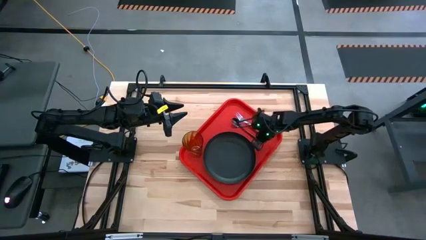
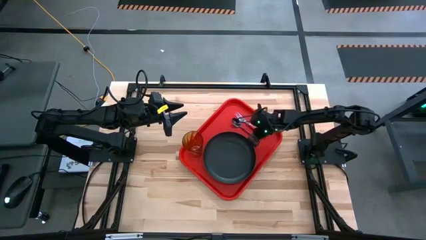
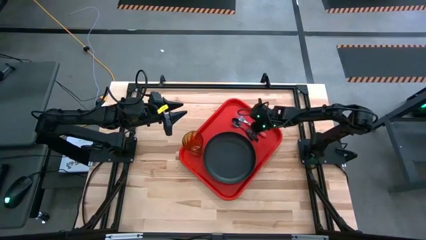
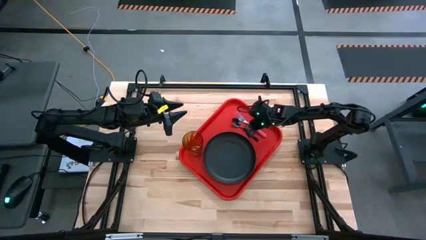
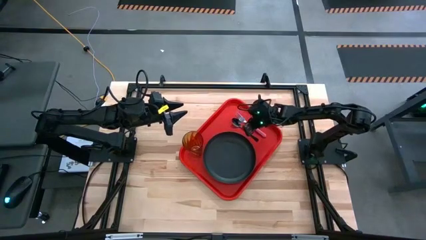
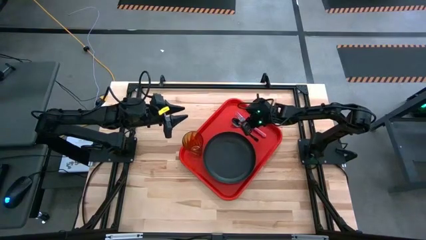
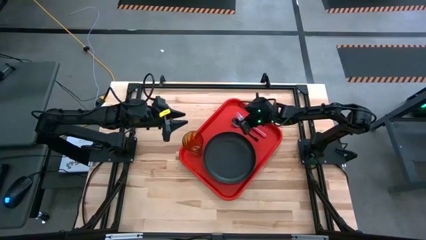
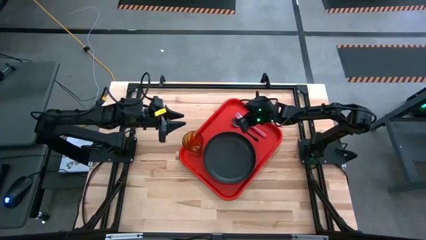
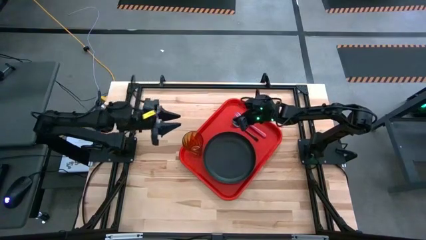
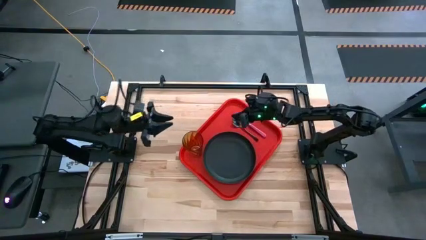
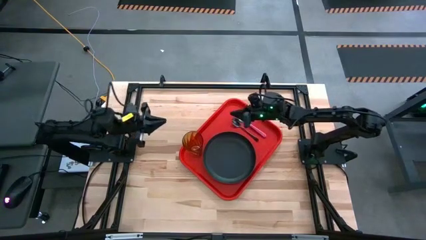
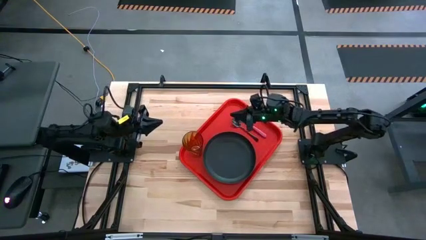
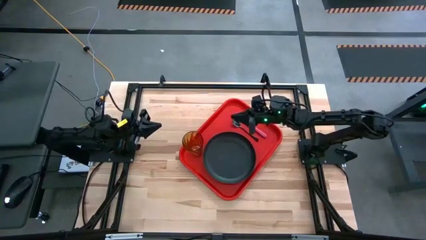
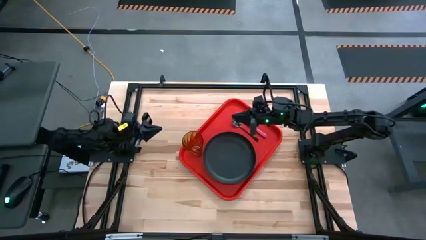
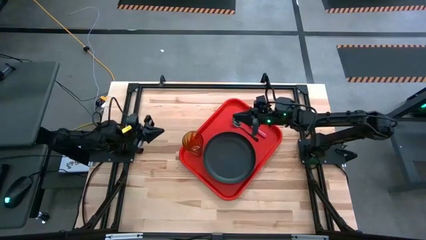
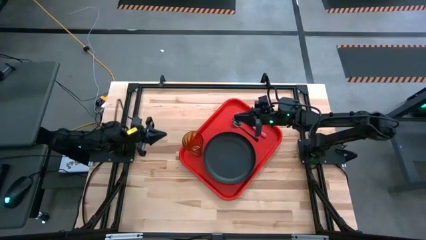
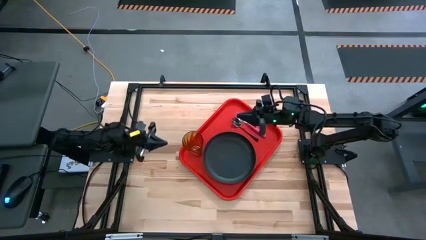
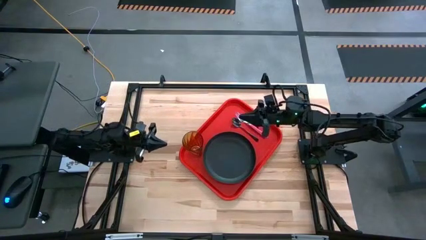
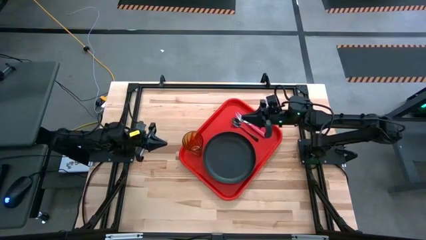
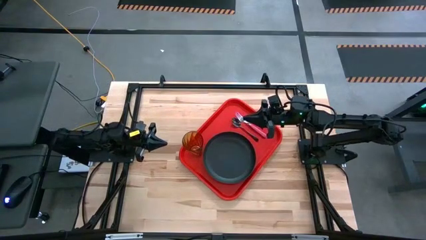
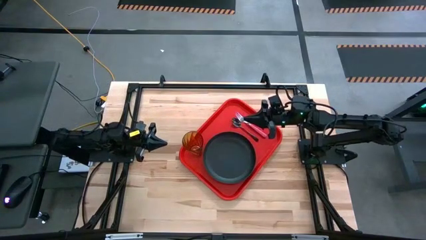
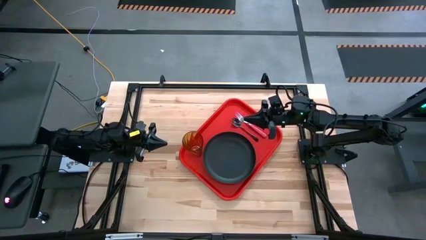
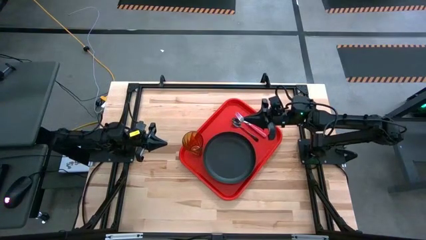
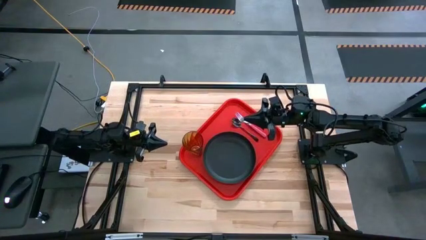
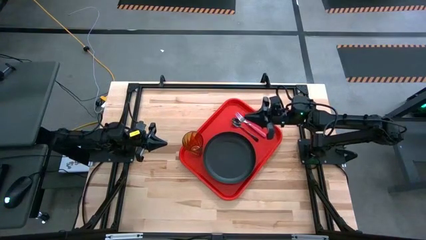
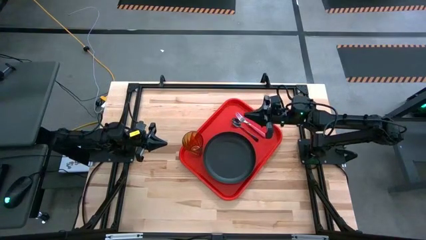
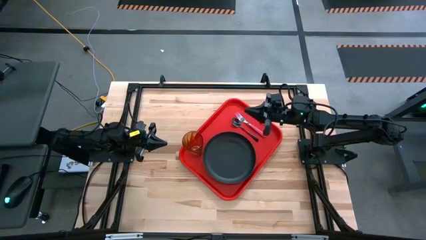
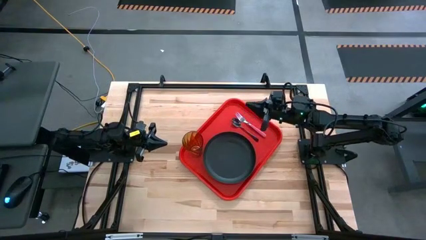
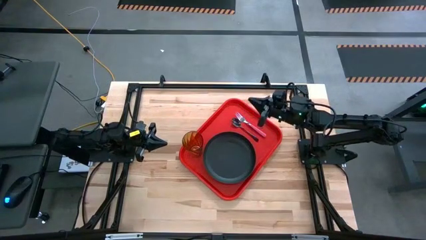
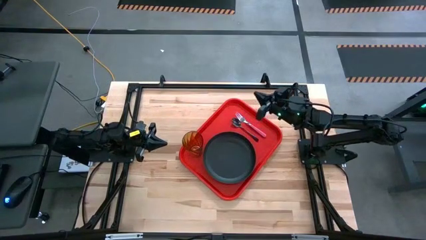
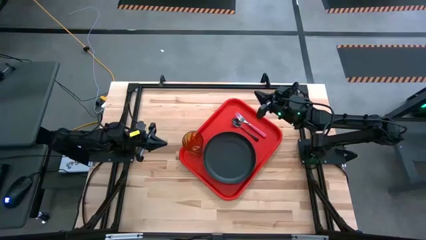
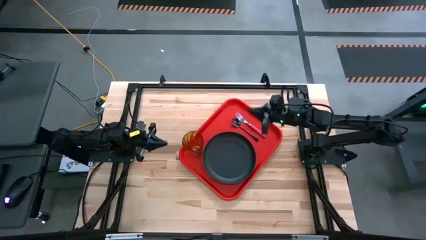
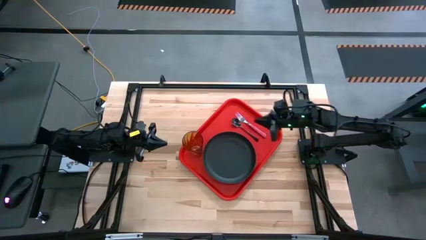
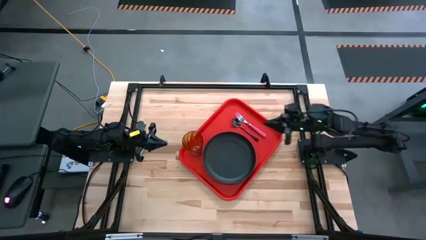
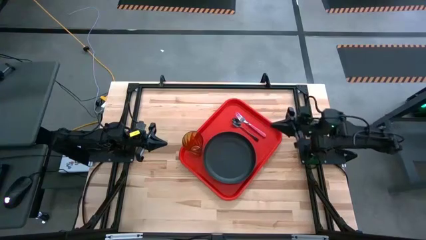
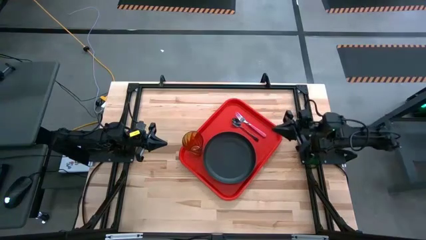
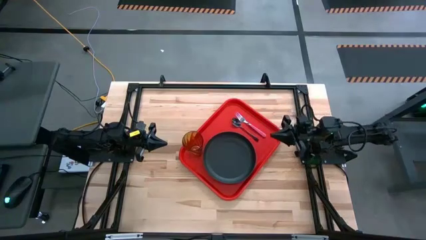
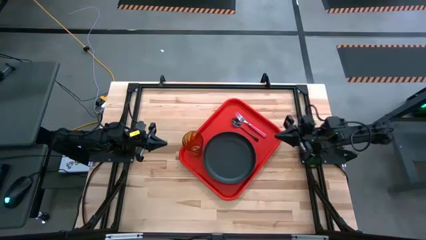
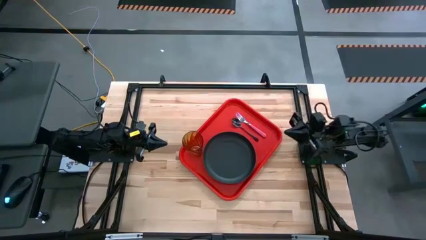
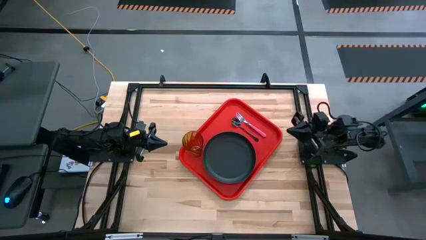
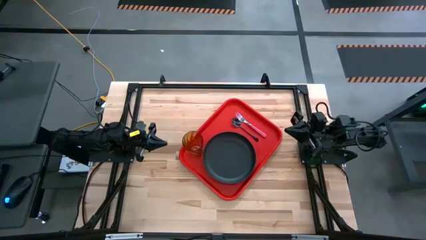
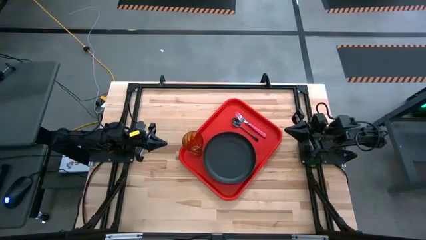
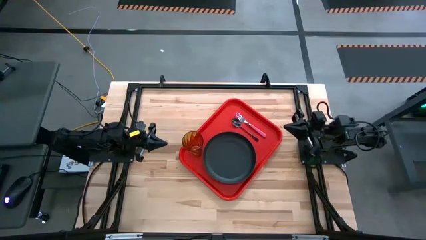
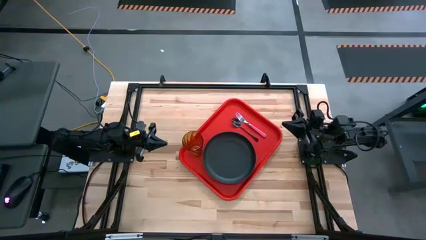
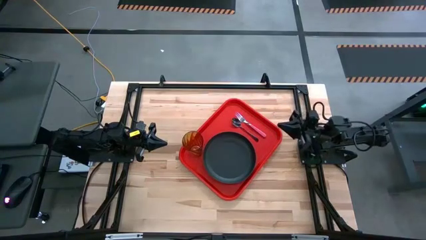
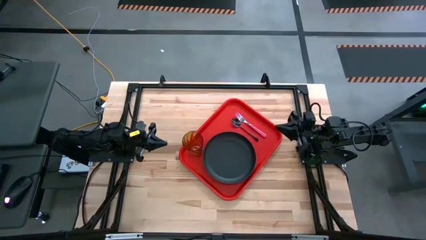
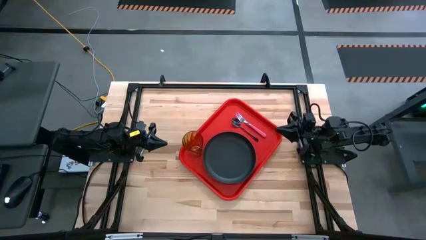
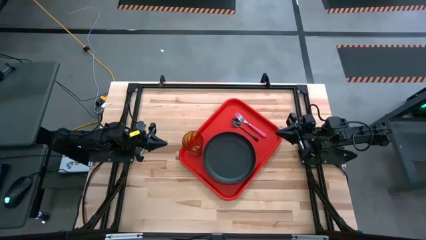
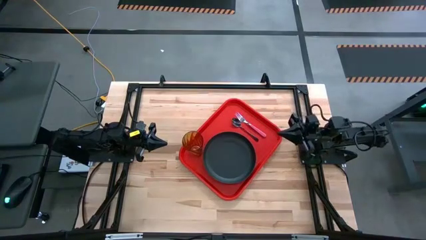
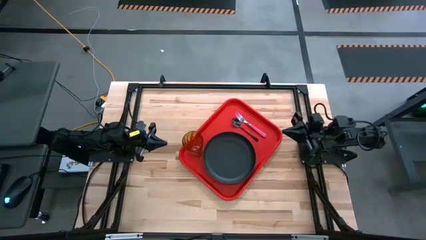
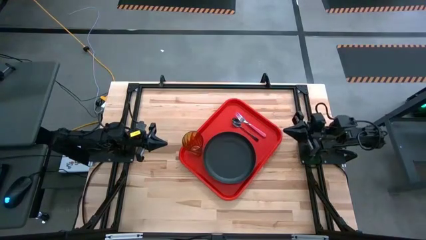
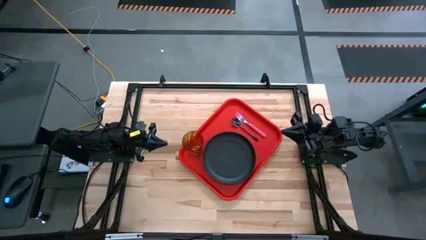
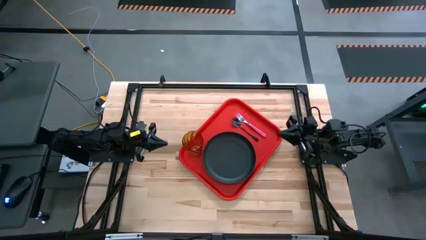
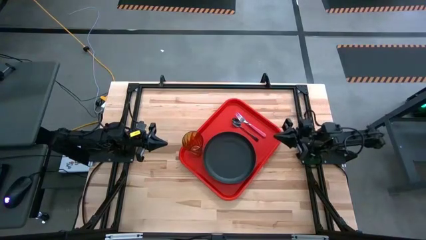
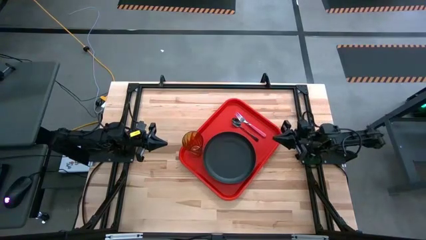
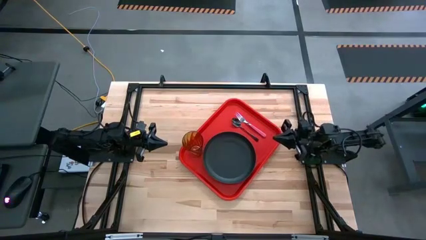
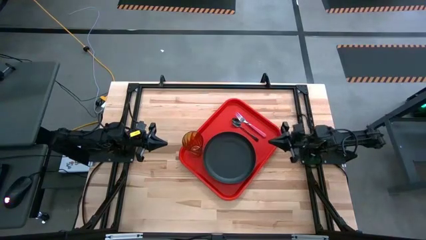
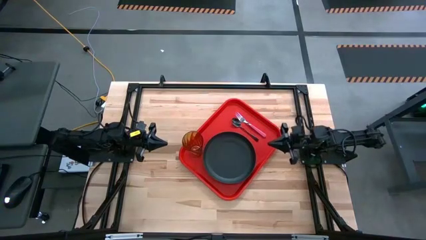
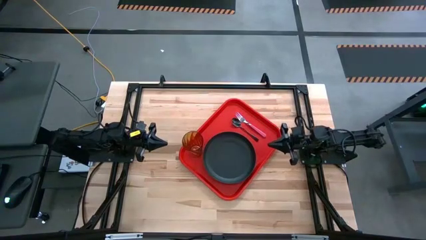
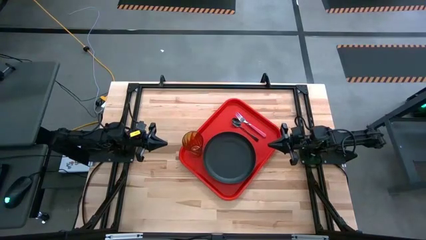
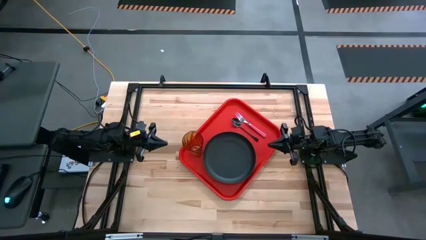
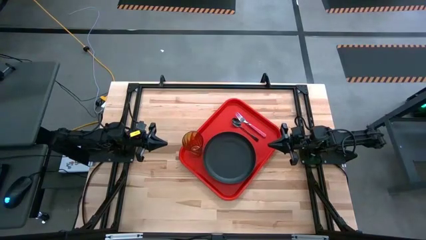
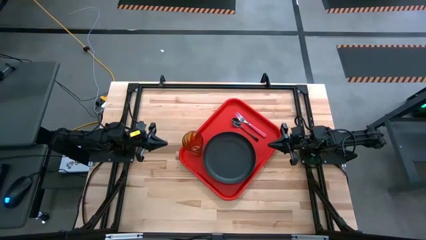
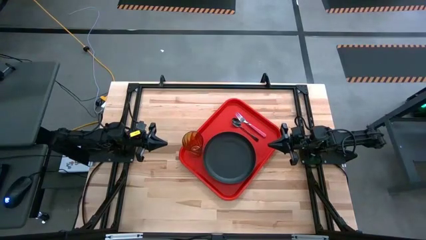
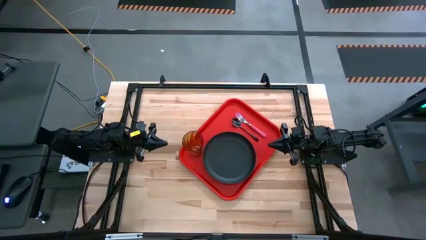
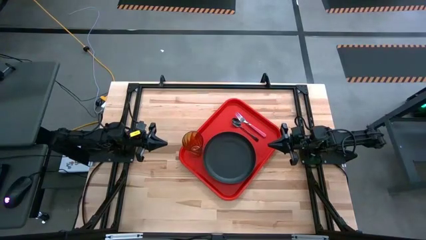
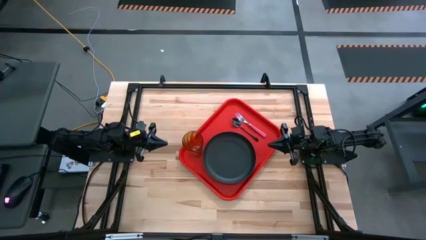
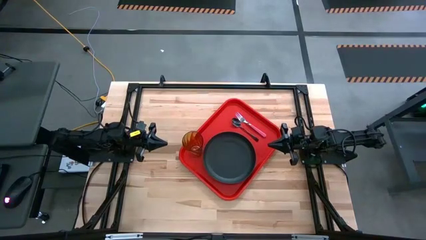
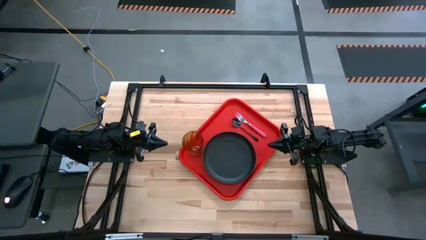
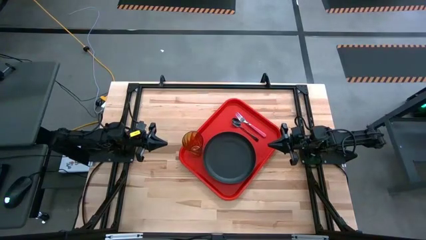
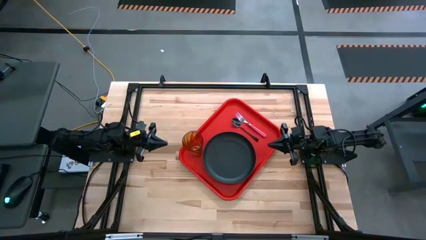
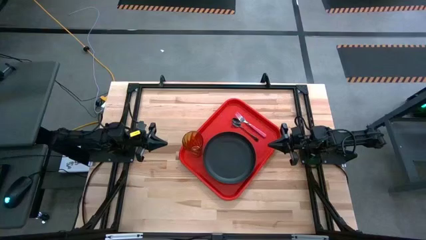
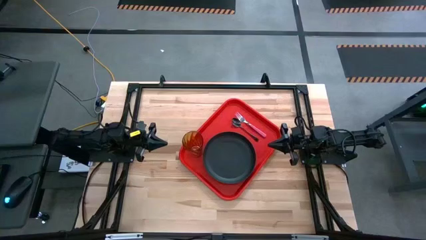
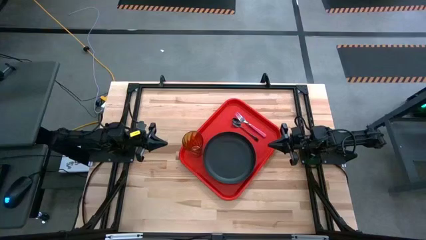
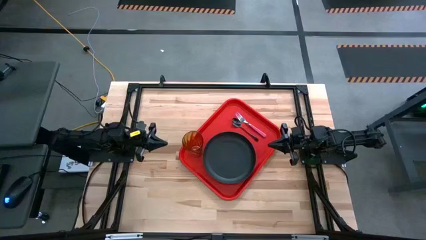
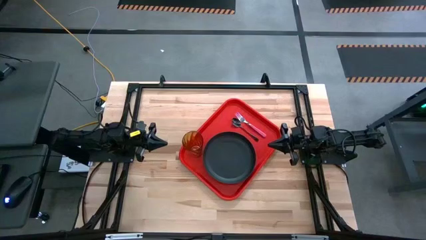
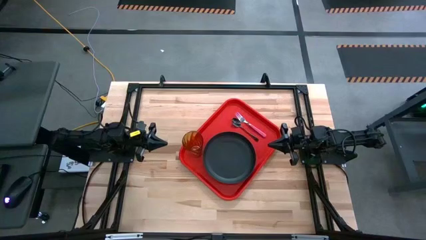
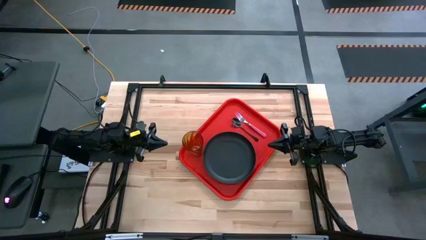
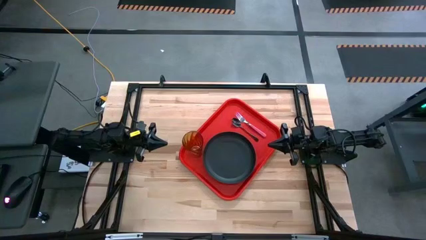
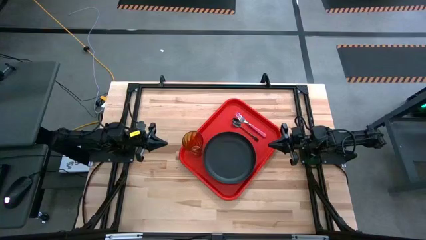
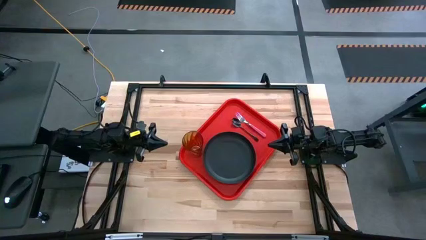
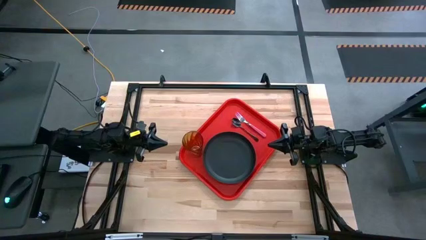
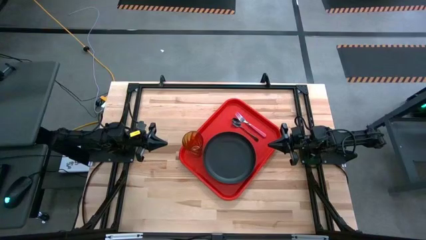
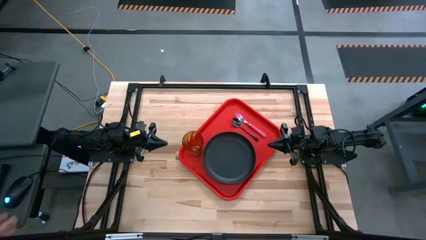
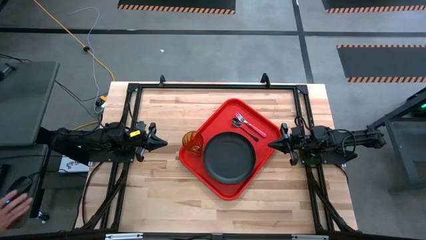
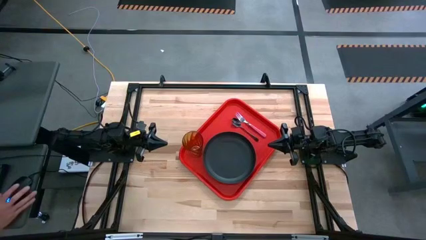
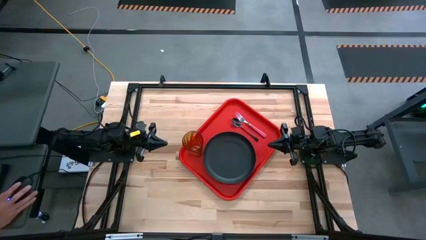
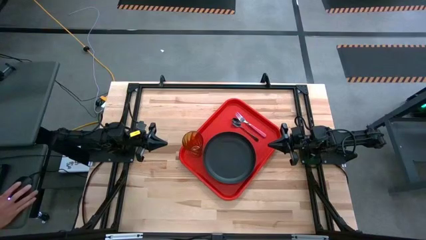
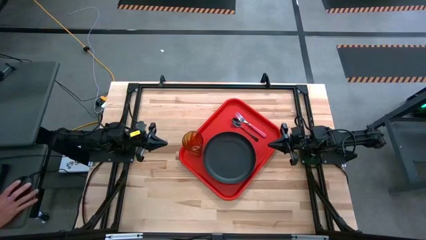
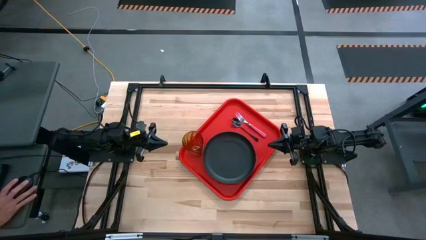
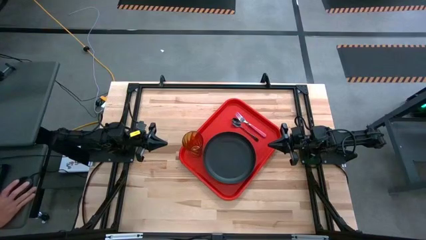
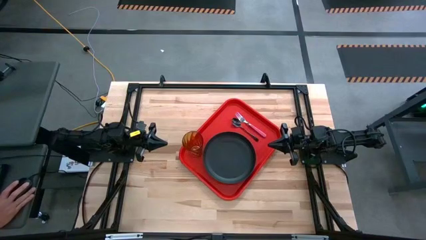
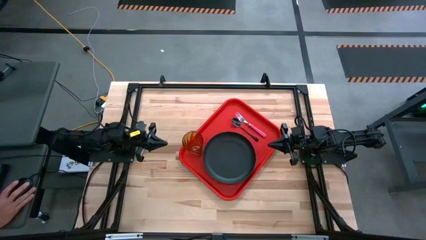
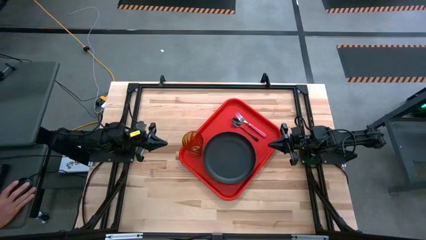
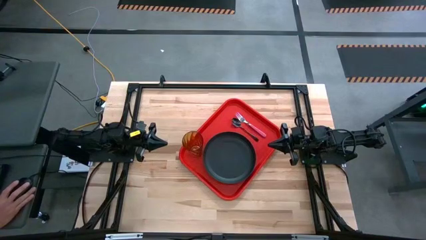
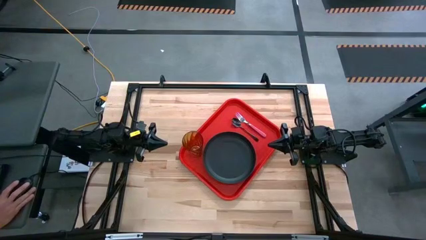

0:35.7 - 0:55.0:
Task: Pick and place plate/cup/fork/spoon on tray
Return to Home Position
